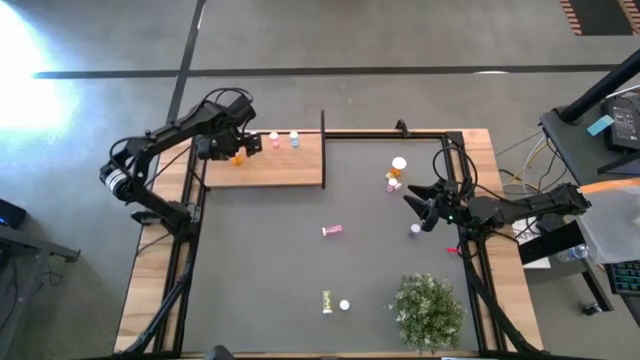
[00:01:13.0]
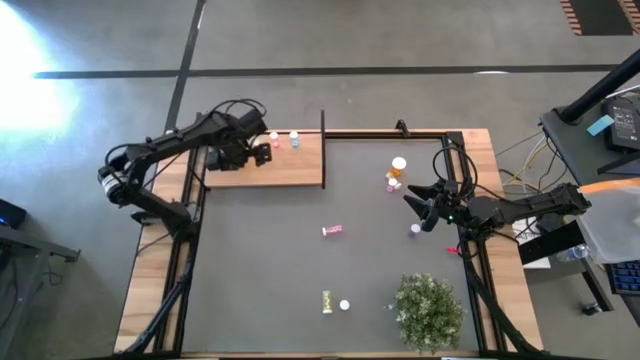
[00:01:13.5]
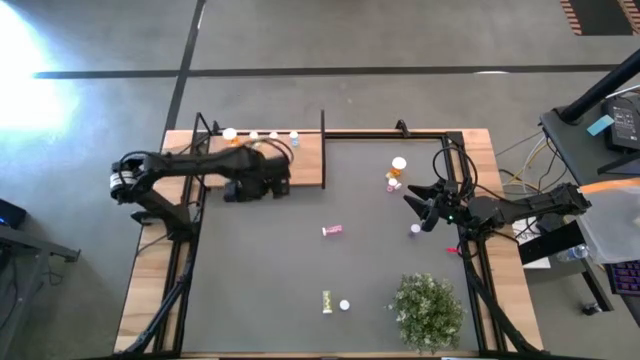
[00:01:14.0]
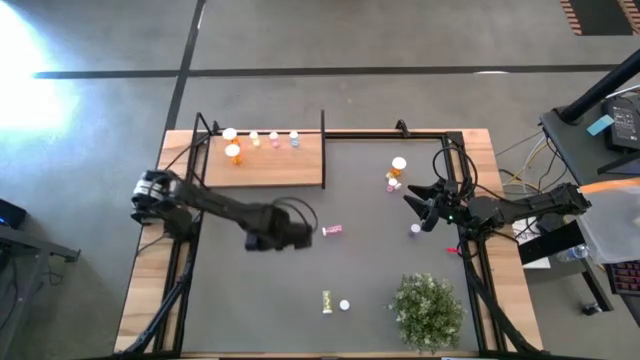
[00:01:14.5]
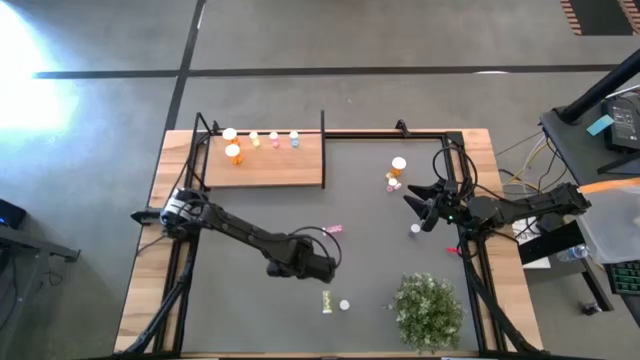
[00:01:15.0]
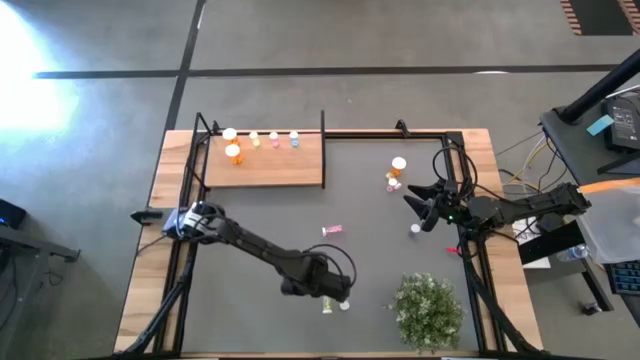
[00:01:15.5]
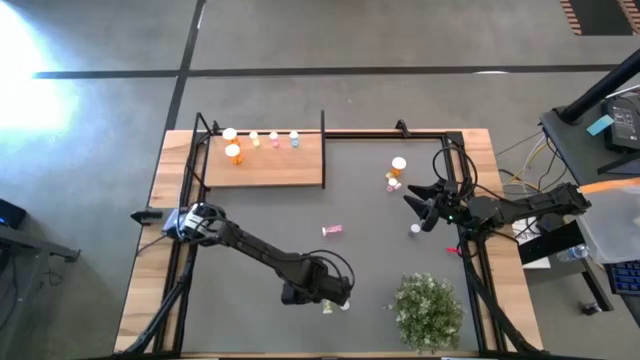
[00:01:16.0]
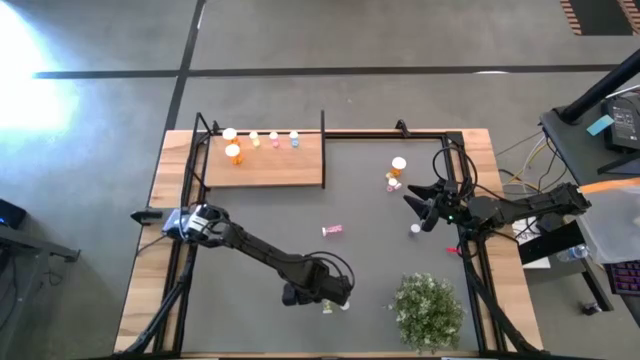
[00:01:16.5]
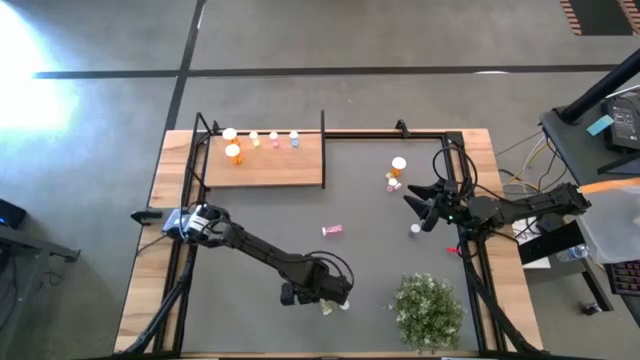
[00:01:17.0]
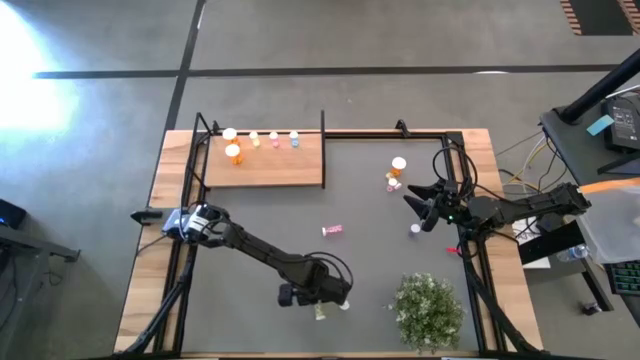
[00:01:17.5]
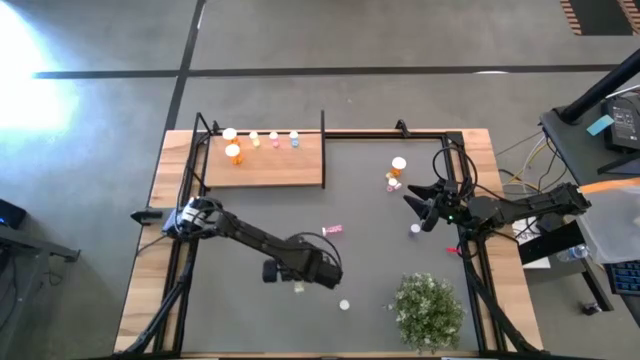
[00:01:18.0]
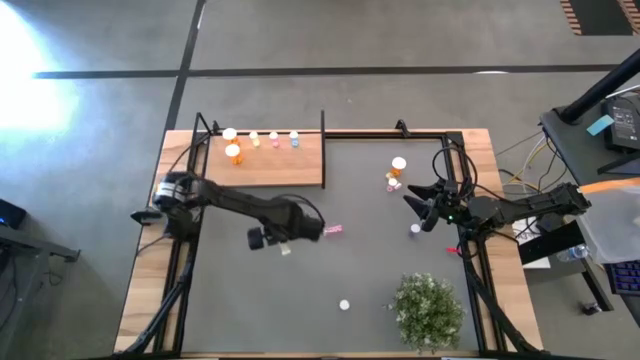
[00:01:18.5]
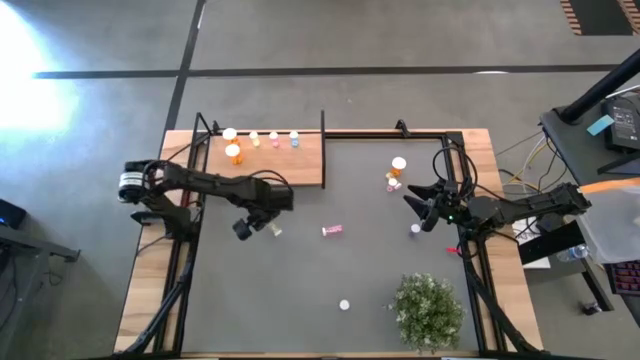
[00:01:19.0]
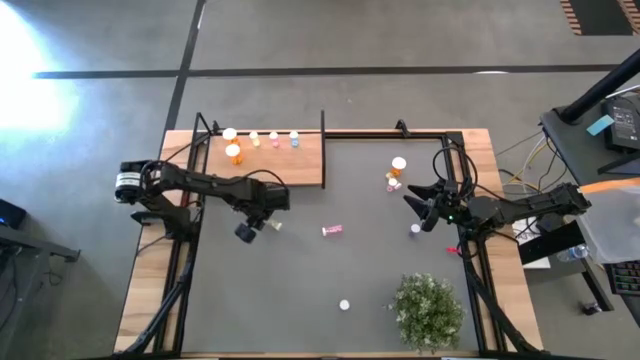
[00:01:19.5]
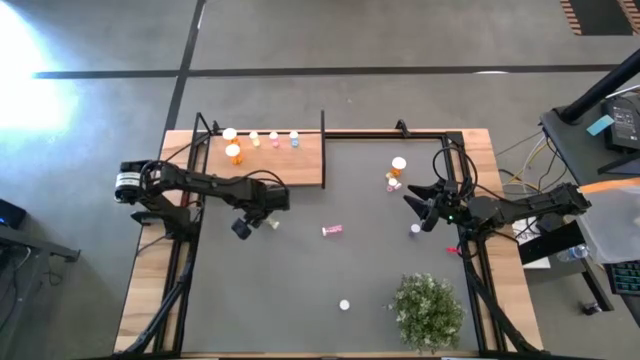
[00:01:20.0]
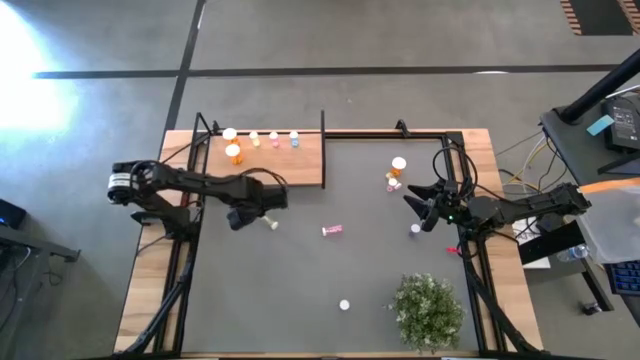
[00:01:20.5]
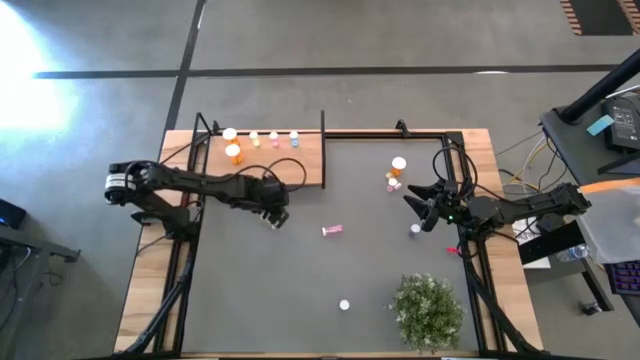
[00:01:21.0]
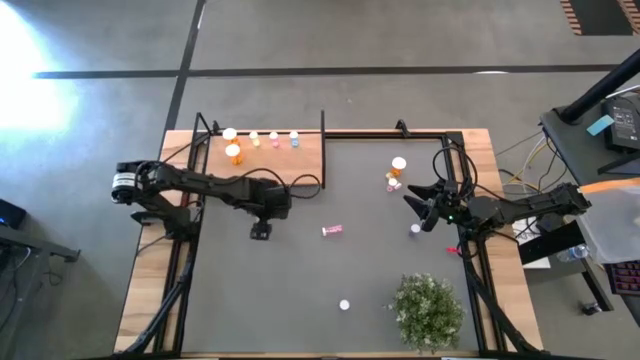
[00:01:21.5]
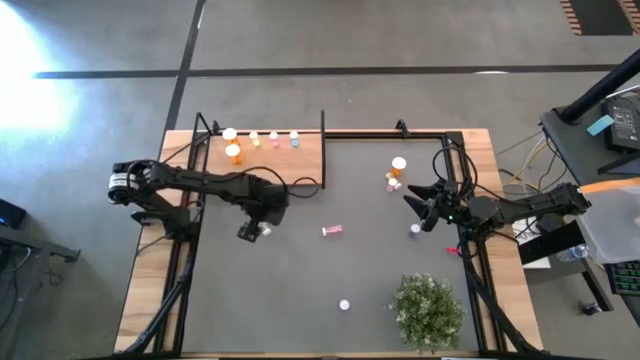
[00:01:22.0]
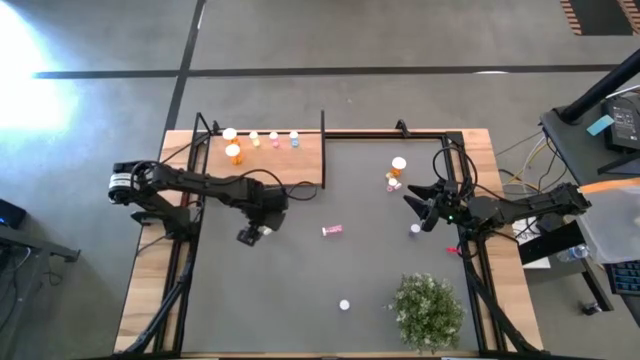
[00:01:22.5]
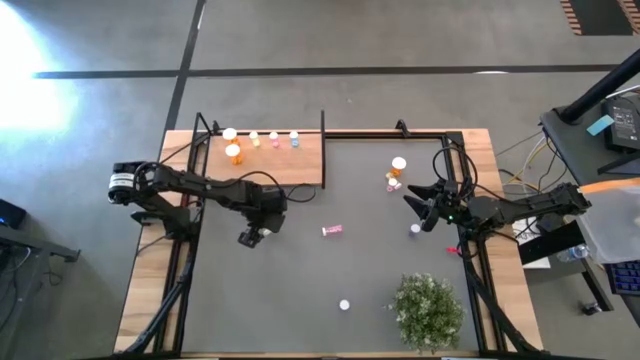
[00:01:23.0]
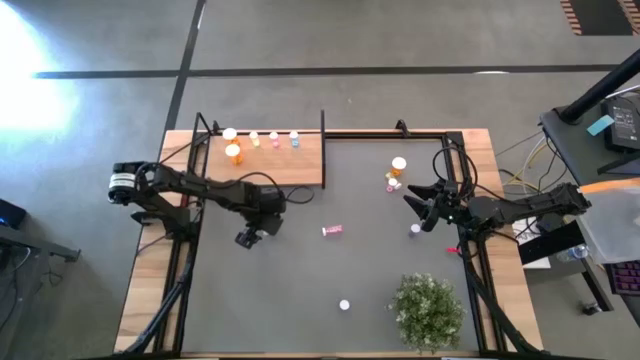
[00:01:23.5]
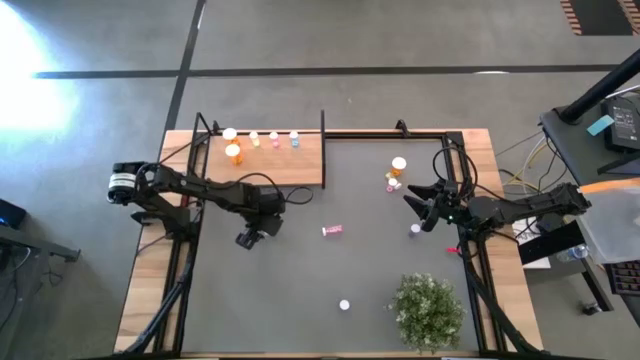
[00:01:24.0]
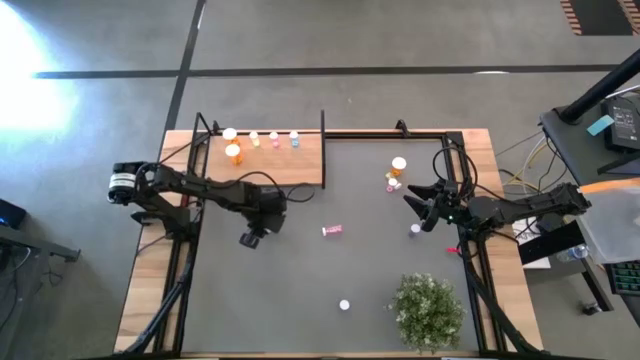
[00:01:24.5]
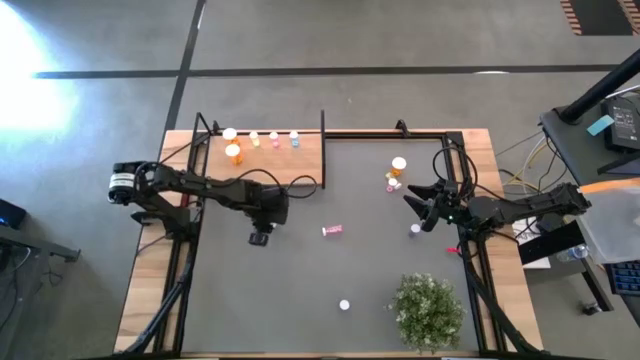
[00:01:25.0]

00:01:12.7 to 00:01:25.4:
Task: Pick and place medicine bottles onto shelf by color
Put the bottom yellow pill bottle on the shelf aligned with the other yellow pill bottle

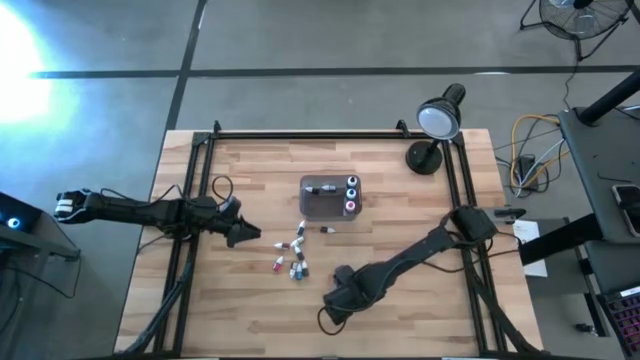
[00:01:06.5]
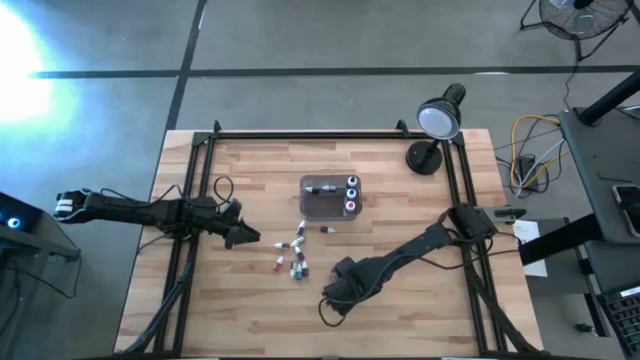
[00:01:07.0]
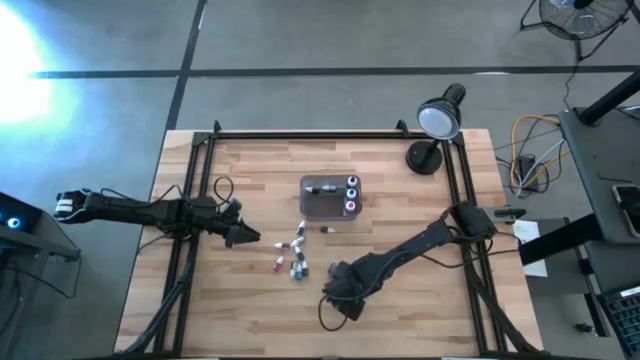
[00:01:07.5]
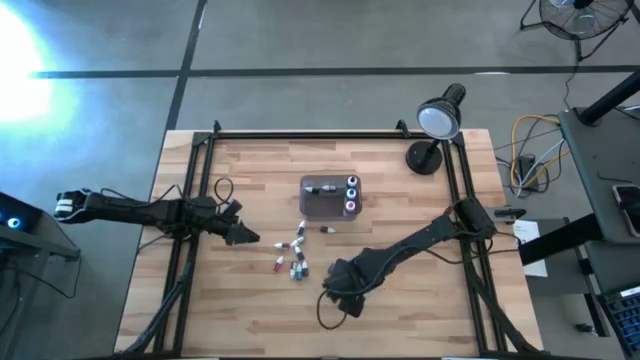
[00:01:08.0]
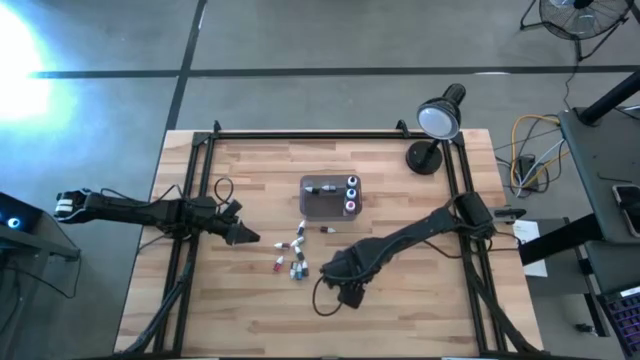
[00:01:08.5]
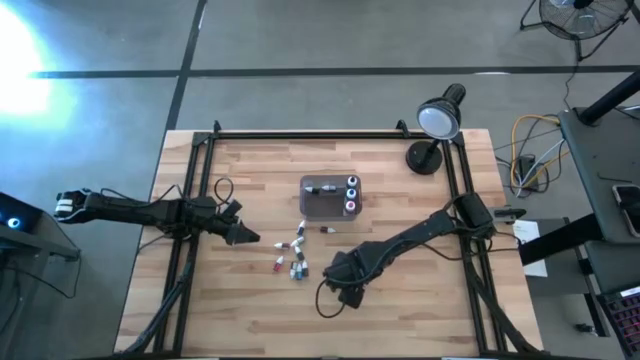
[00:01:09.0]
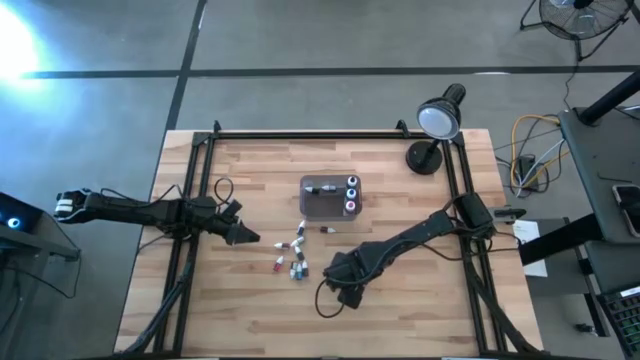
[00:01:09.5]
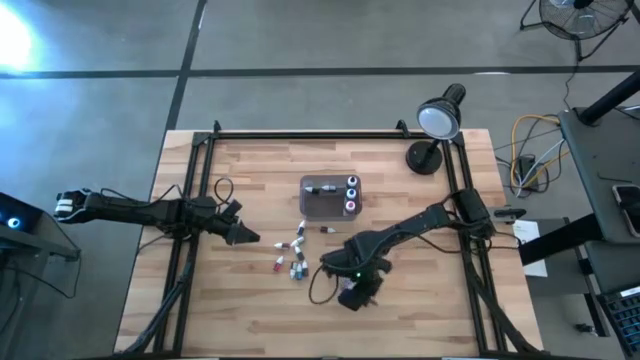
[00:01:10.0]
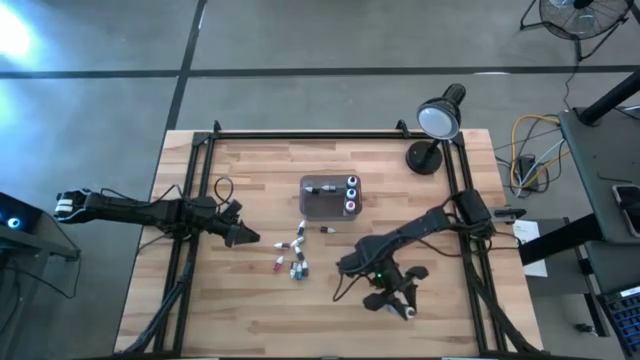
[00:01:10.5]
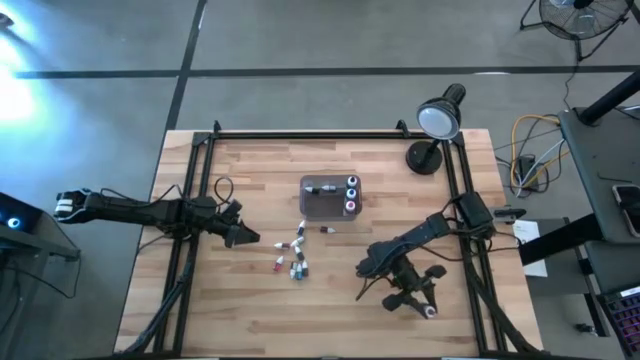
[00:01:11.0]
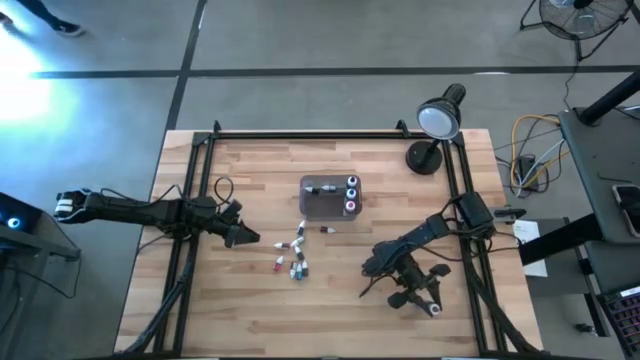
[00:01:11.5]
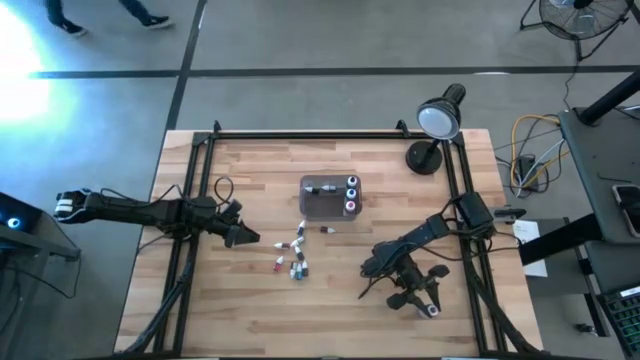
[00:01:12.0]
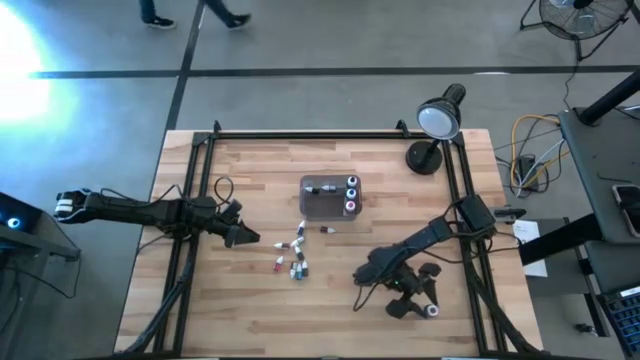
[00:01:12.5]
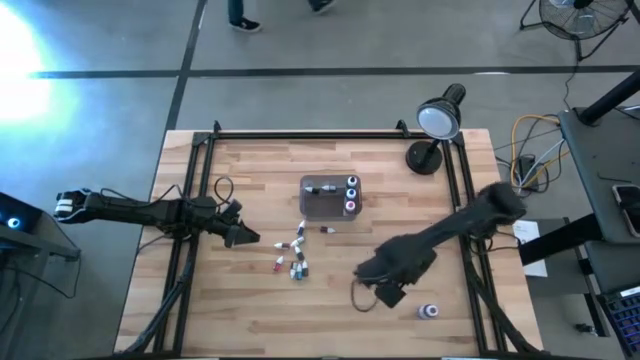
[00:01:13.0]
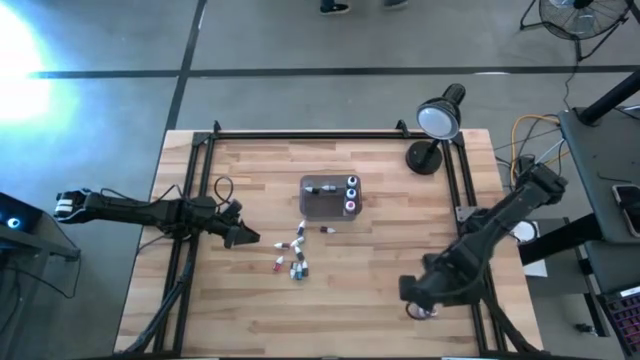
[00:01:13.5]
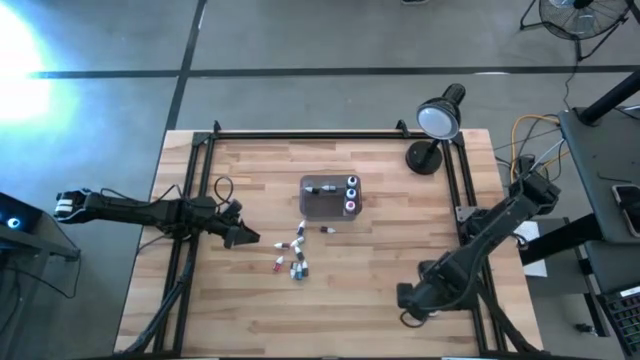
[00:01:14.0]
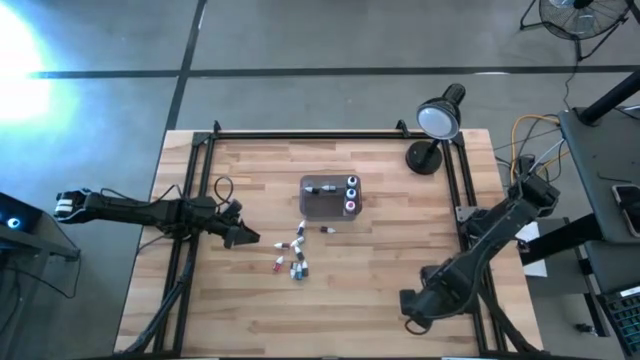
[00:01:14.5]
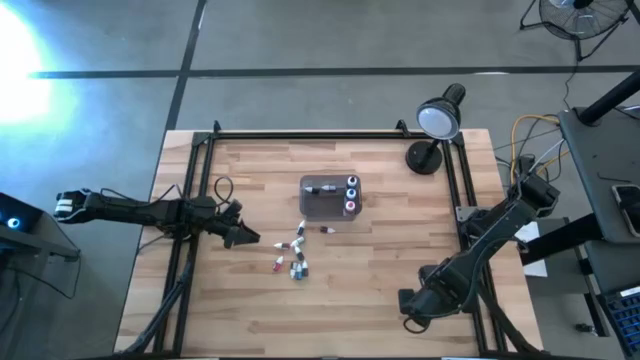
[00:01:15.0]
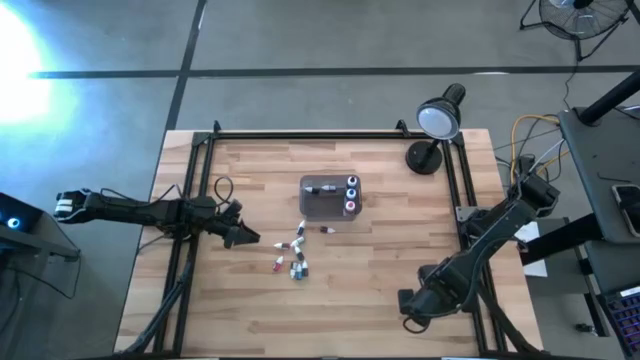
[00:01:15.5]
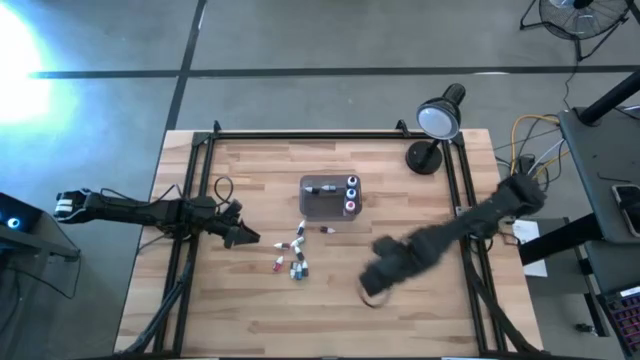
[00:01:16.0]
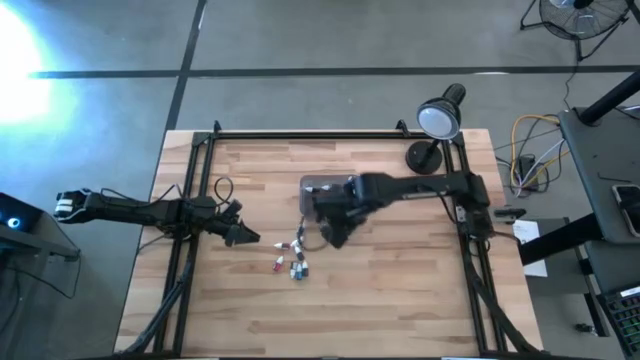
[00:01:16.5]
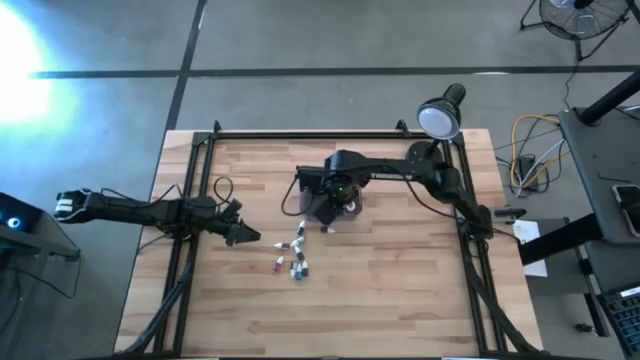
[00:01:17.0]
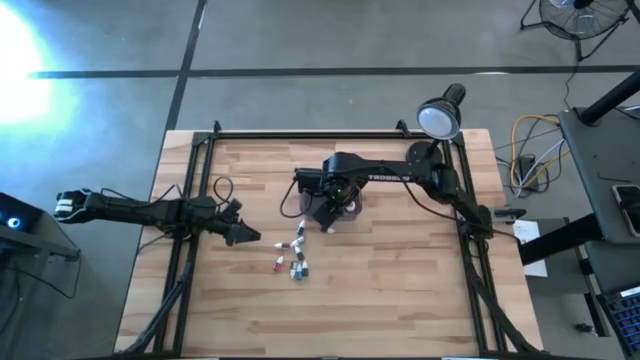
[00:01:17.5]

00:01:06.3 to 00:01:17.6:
Task: Pick & Place food coloring
Put the large violet food coloring bottle into the bin
